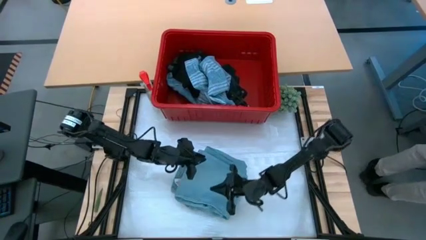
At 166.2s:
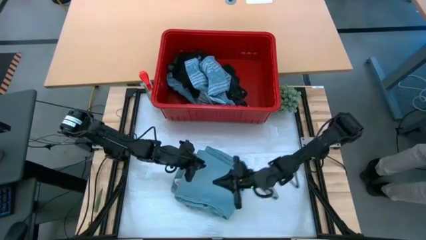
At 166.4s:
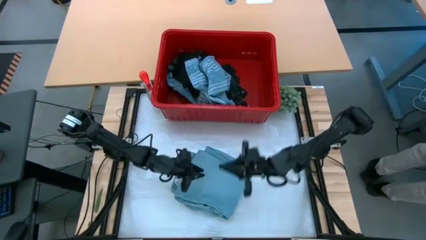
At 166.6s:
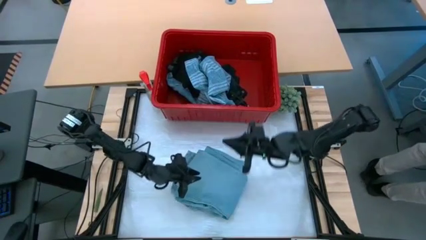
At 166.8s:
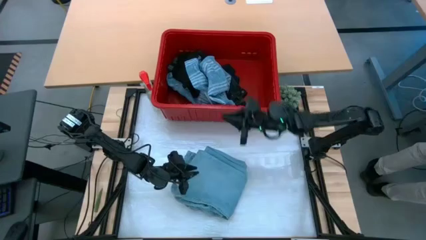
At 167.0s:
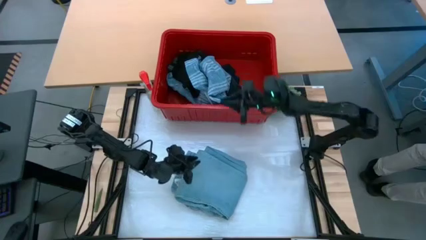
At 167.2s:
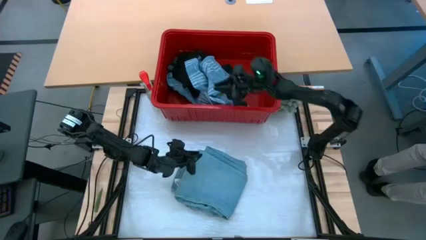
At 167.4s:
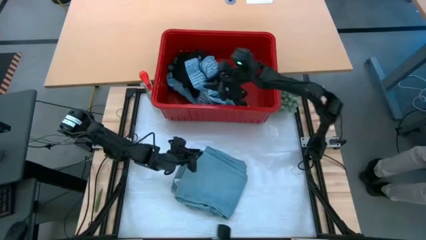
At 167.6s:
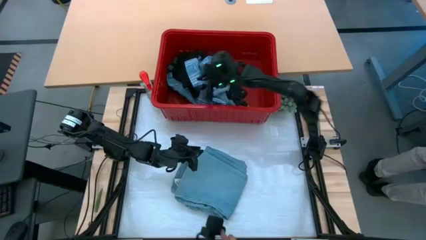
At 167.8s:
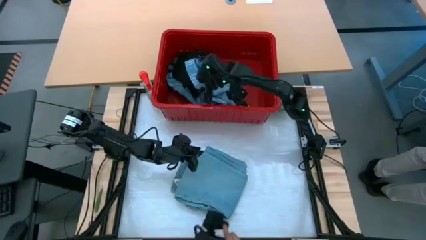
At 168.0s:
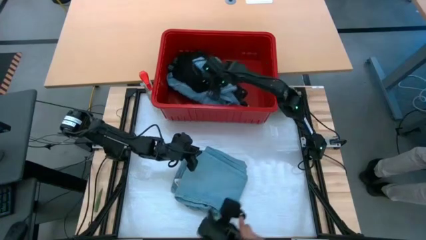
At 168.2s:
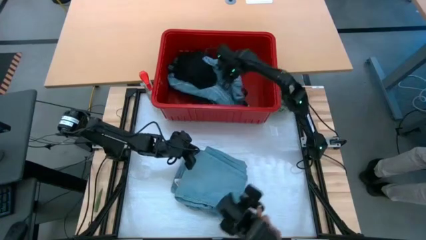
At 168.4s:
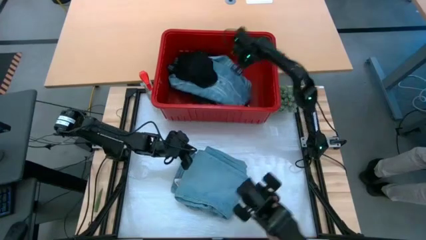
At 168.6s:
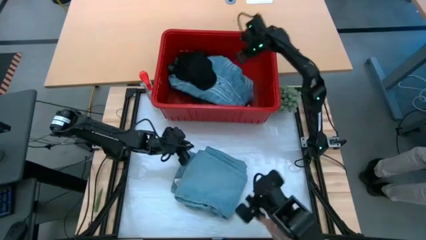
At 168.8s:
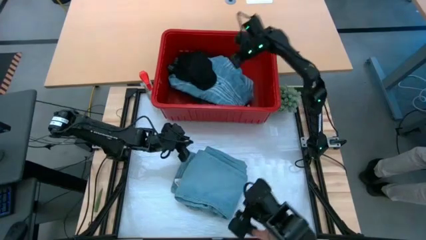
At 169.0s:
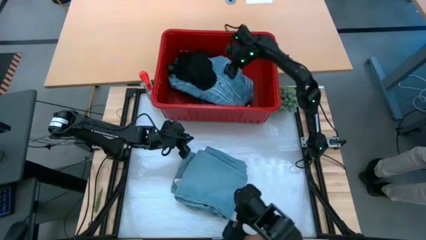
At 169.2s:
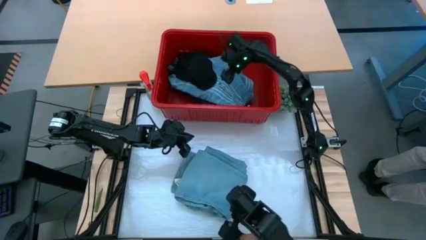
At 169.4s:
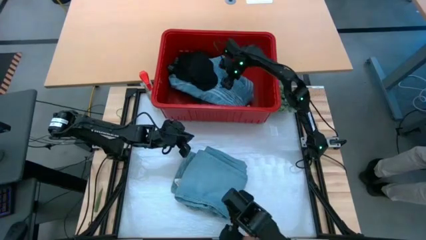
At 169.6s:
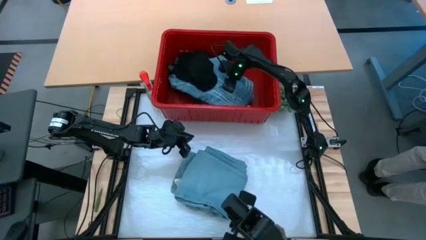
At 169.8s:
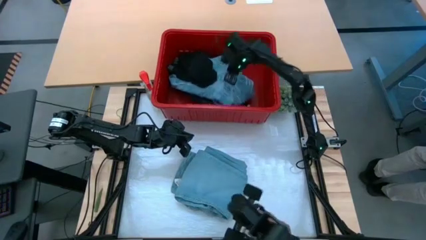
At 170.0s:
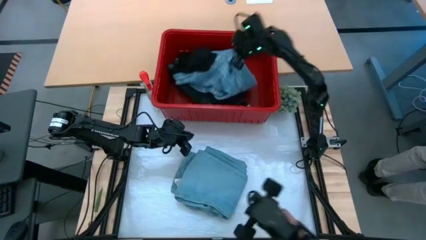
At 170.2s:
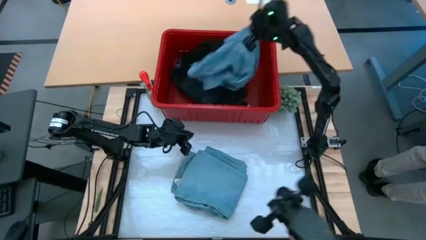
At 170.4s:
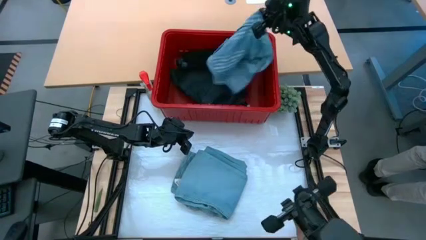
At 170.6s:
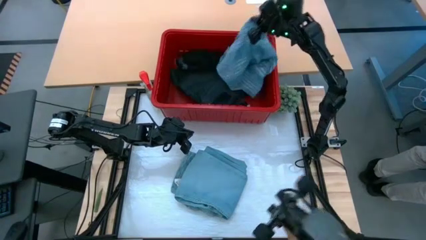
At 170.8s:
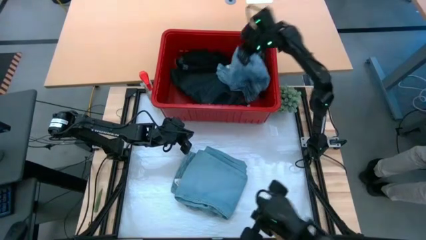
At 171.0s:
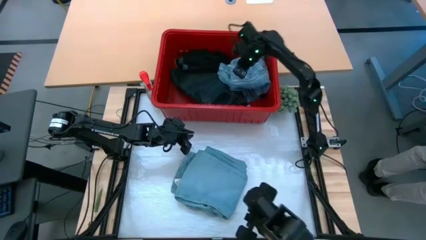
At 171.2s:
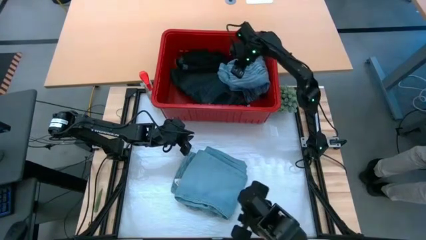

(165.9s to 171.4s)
Task: Fold Laundry from Bin
Adjust the blue and white patterned shirt in the red laundry bin

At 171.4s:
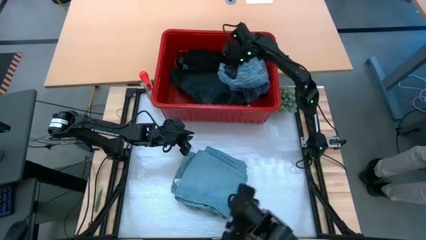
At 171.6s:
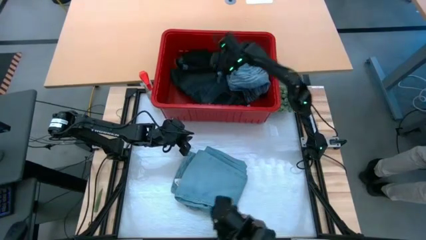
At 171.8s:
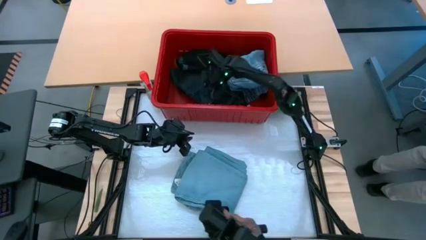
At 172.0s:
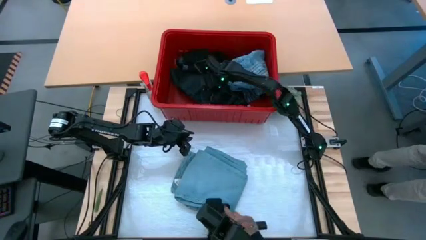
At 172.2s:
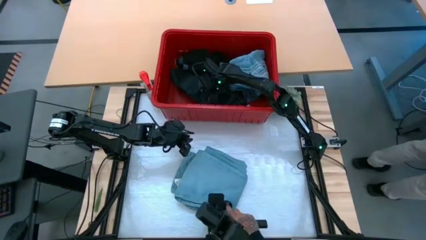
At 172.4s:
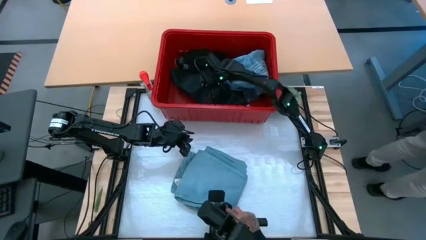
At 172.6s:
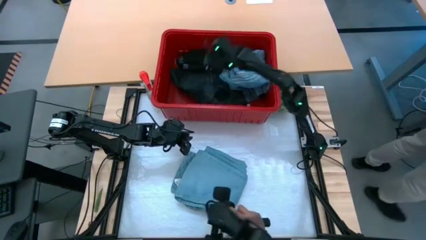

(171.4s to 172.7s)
Remove the dark blue pants from the red laundry bin

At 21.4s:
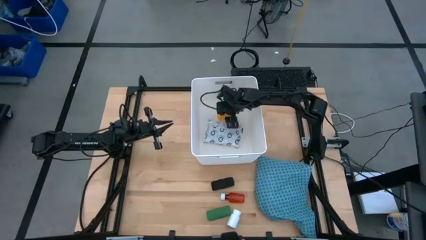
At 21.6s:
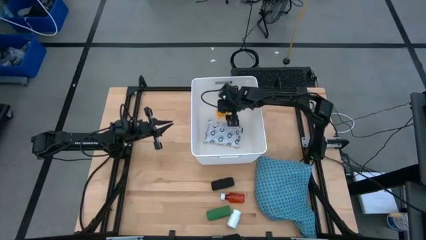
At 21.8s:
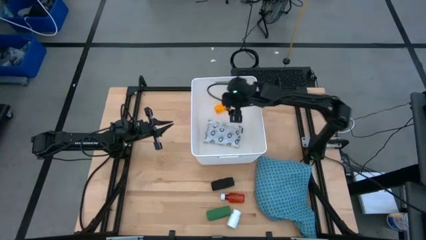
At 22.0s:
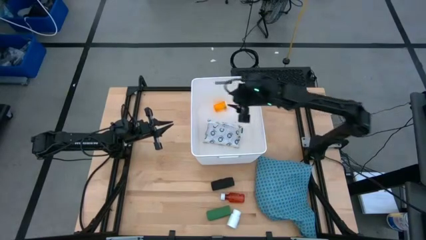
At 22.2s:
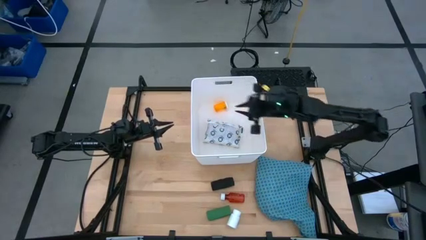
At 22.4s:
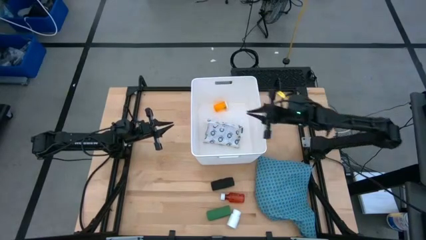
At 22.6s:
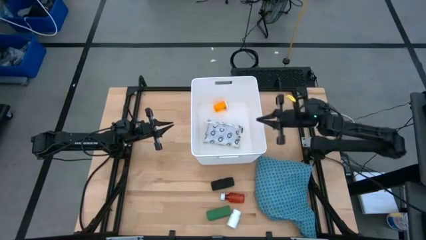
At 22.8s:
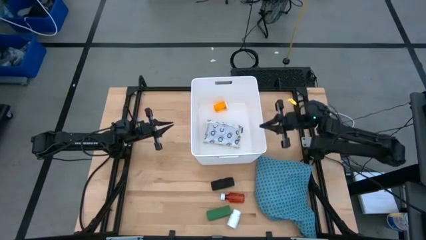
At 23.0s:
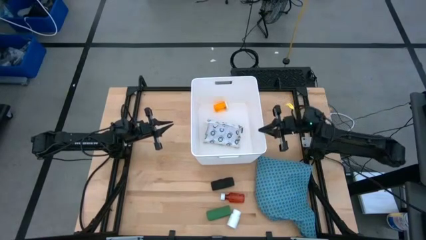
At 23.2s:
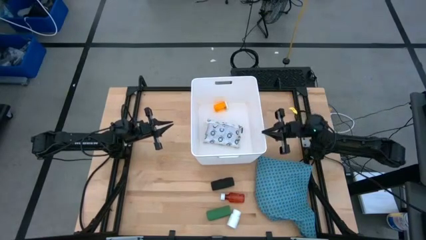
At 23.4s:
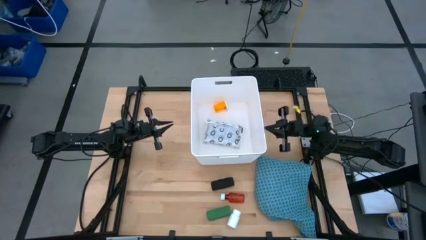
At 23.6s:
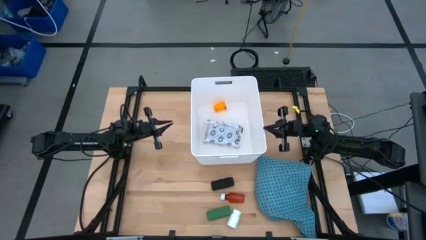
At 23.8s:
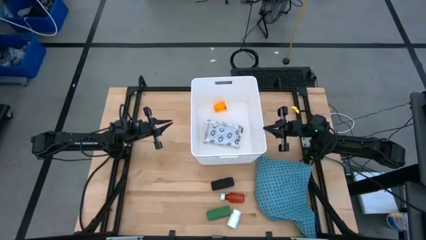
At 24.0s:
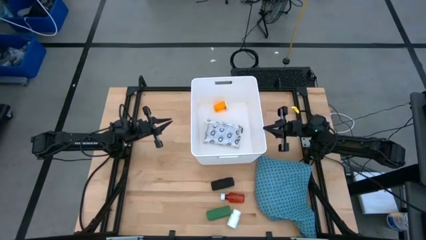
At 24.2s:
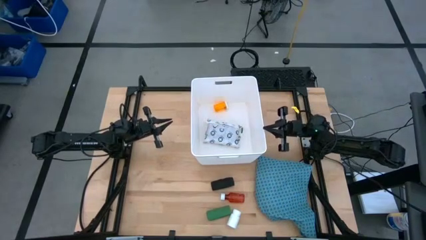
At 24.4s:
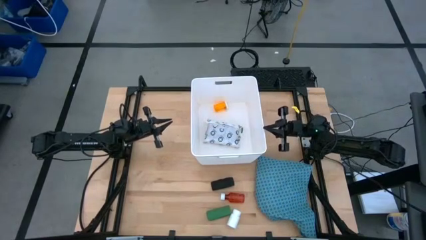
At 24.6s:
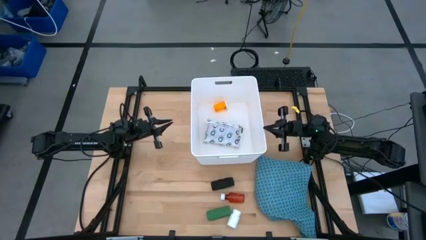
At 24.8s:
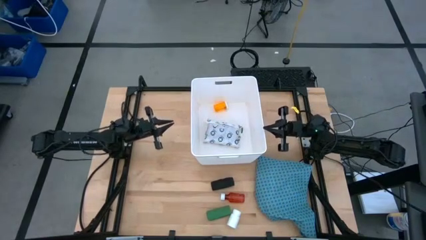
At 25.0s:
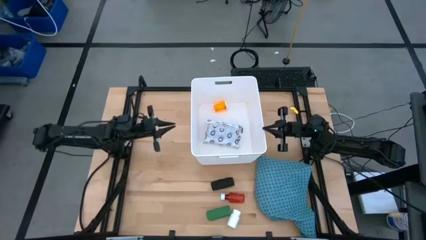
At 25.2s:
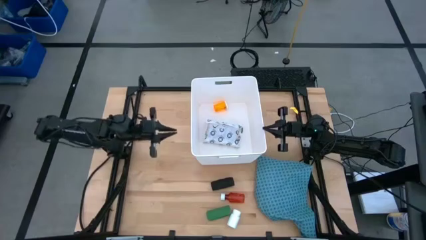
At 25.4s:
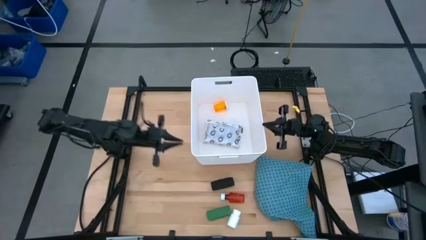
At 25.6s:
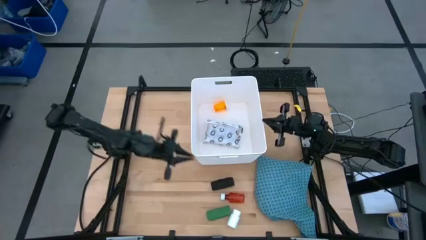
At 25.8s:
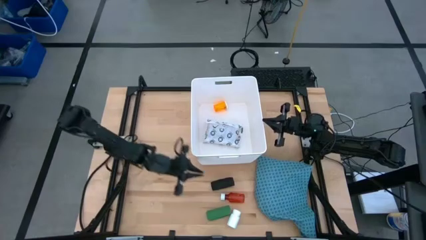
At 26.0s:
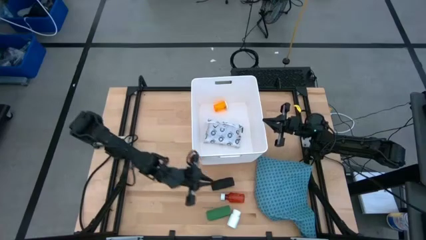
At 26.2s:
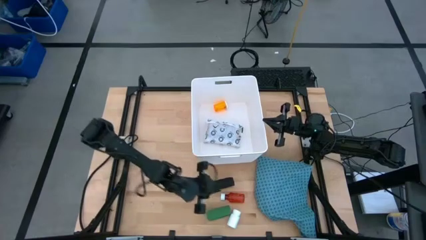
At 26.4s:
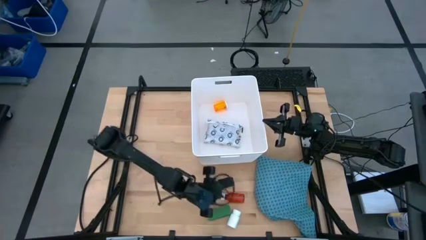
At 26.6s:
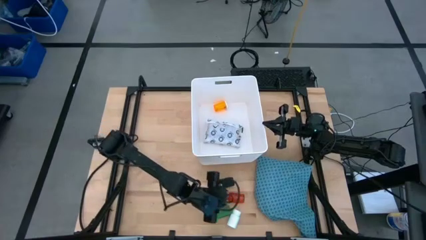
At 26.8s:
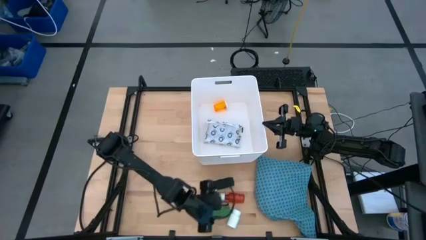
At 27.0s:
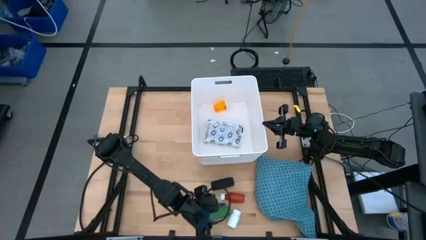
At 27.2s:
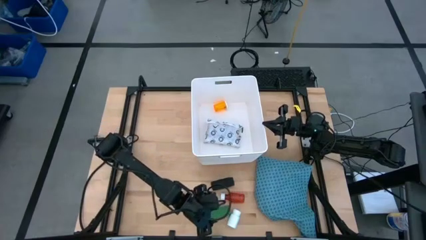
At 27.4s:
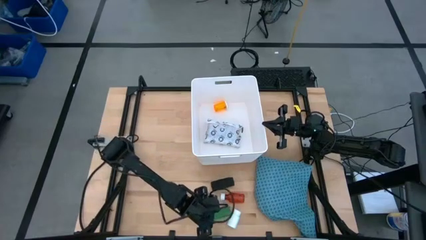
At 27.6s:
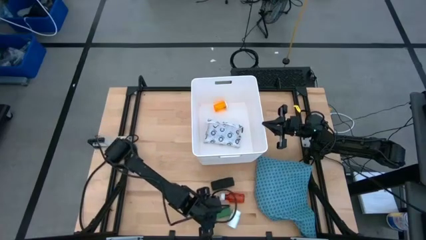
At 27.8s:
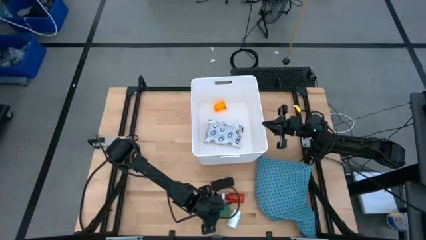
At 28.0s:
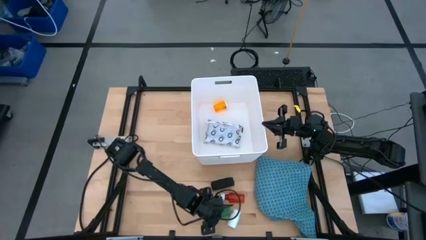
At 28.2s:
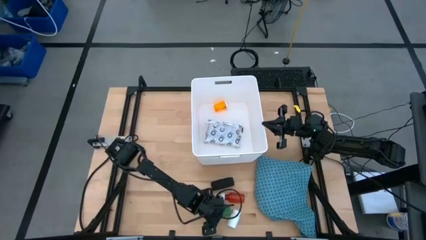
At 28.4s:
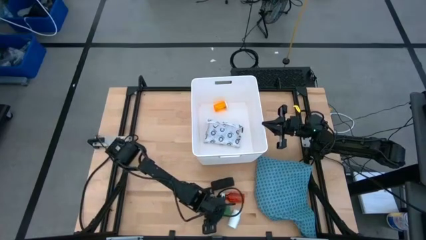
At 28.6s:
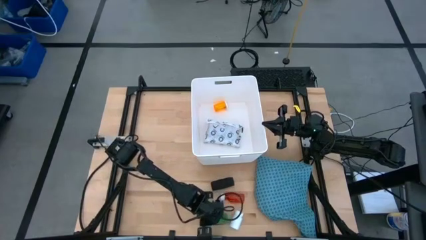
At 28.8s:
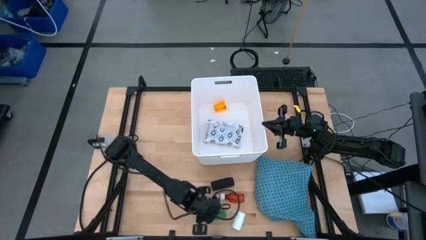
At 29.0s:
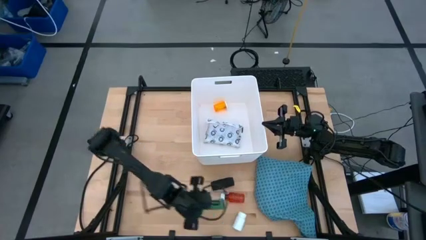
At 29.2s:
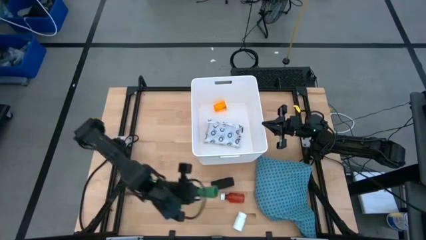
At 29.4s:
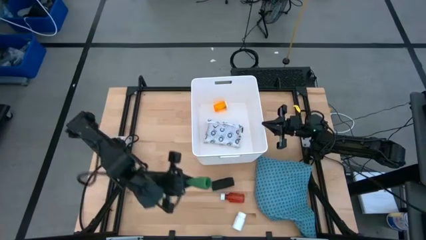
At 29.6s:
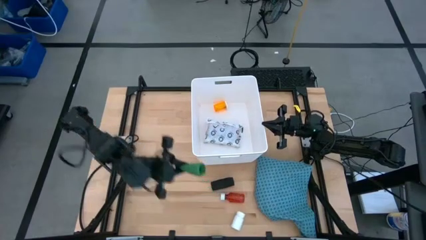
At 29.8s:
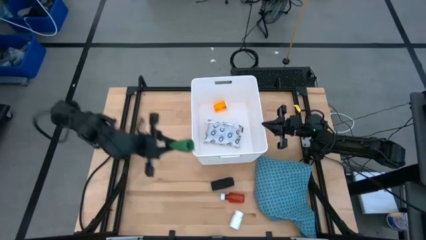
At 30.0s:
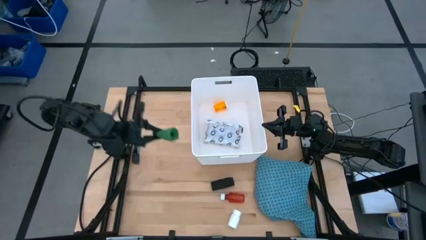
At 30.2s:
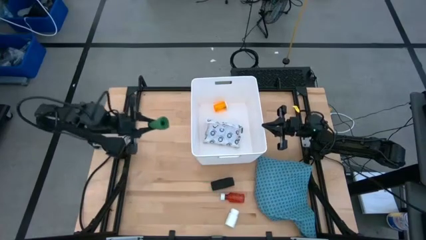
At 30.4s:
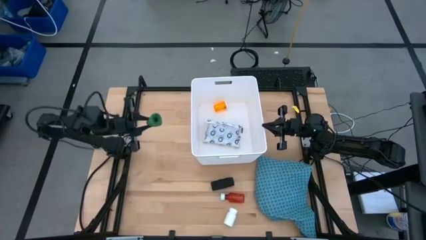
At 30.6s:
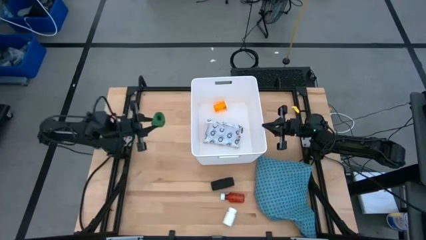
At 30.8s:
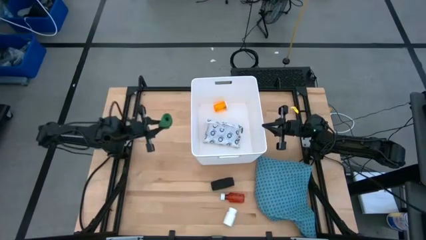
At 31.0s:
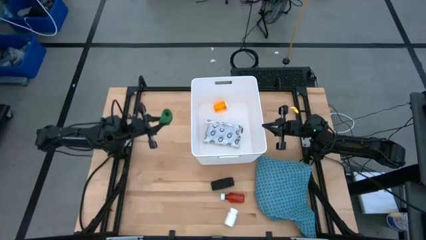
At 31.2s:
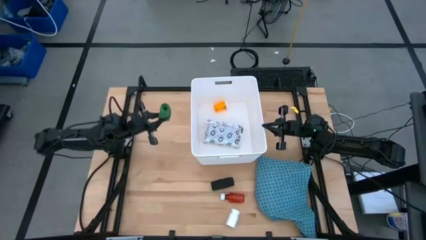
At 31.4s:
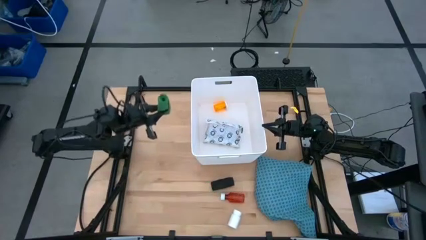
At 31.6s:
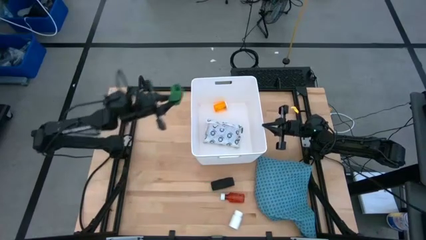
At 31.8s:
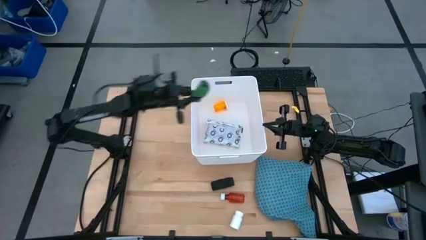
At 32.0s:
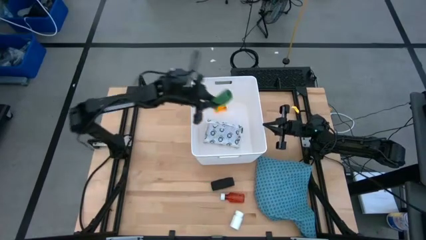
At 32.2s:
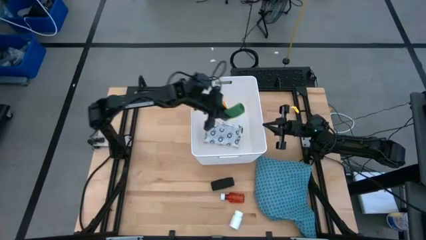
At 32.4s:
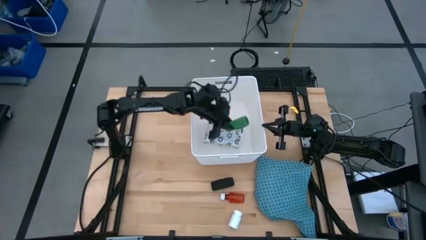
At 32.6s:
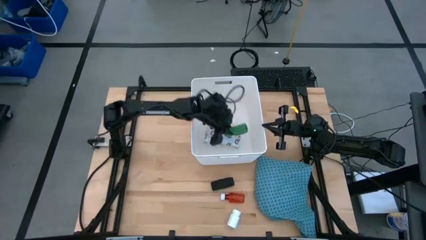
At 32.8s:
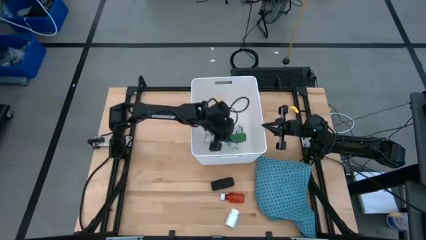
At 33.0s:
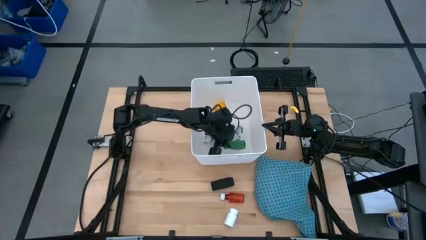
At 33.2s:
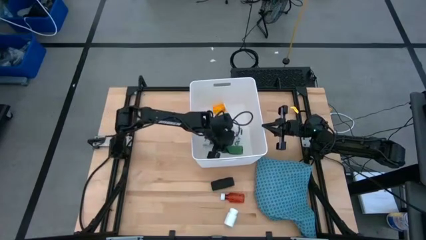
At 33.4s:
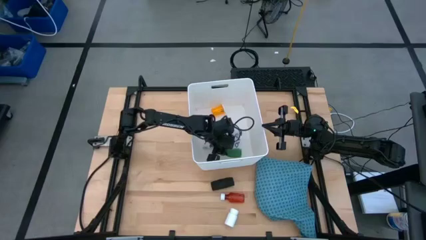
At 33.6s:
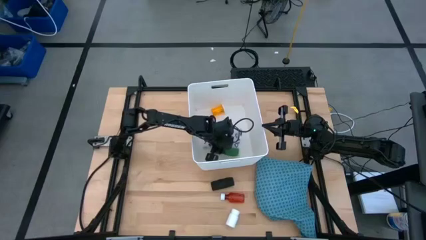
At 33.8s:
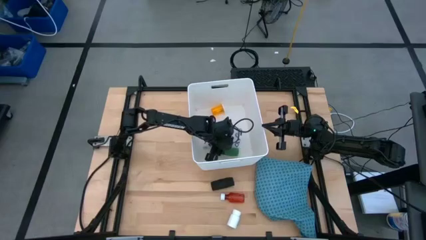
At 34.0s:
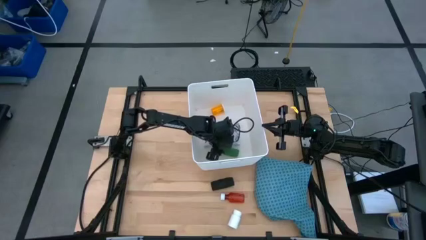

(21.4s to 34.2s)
Task: Pick & place medical supplies in basket/bin
Put the green bandage into the white bin
